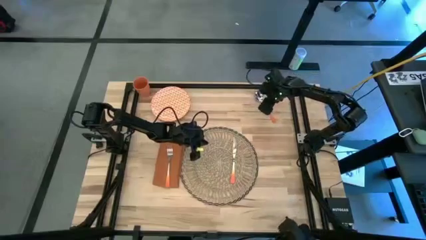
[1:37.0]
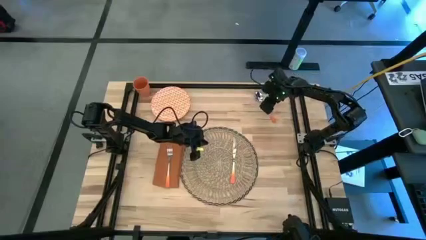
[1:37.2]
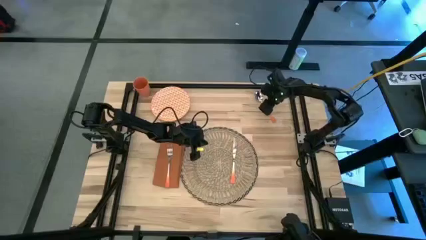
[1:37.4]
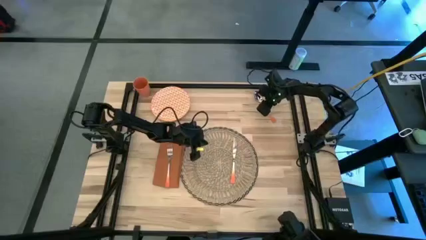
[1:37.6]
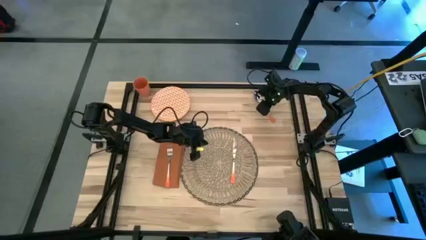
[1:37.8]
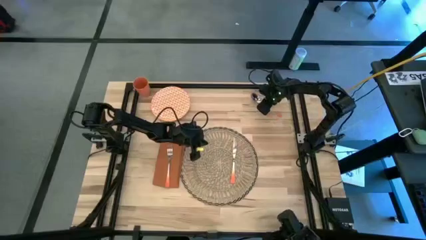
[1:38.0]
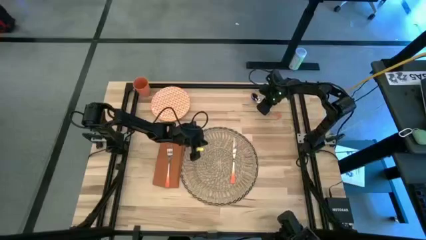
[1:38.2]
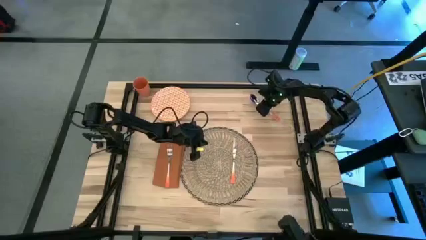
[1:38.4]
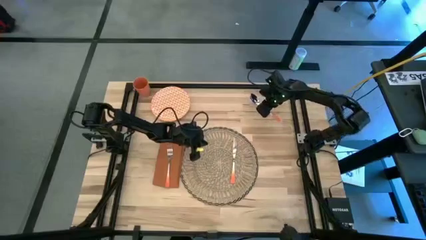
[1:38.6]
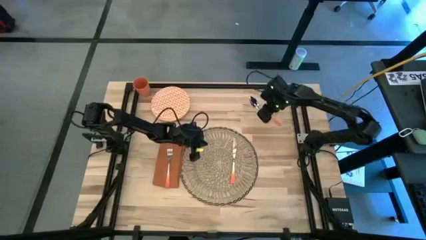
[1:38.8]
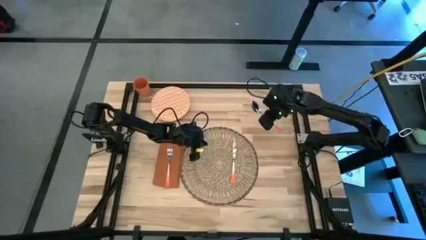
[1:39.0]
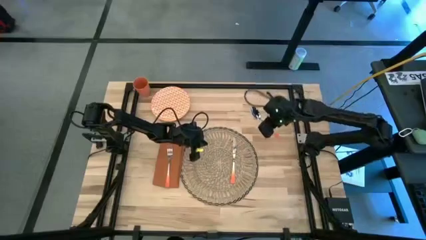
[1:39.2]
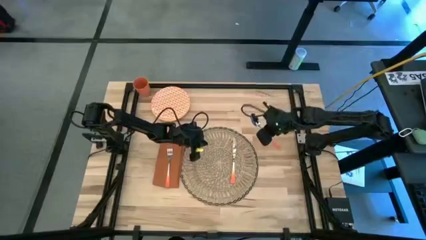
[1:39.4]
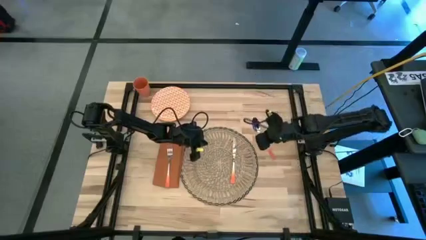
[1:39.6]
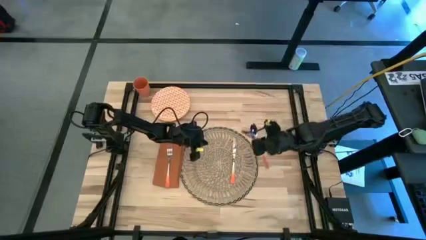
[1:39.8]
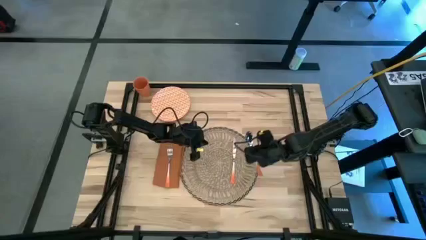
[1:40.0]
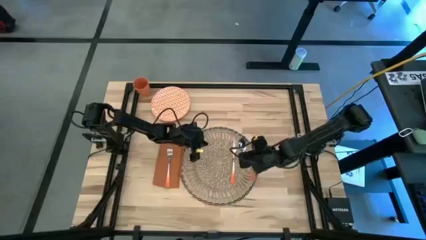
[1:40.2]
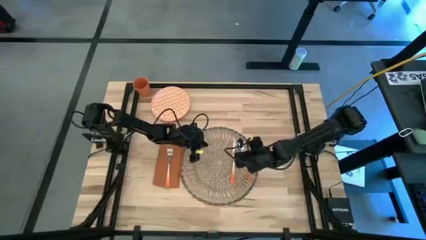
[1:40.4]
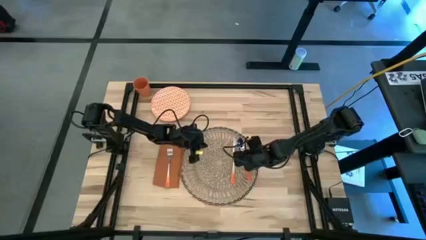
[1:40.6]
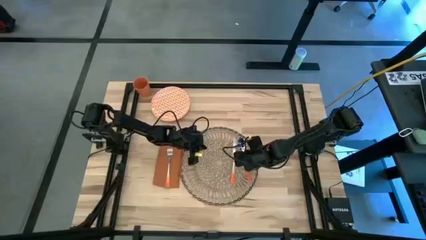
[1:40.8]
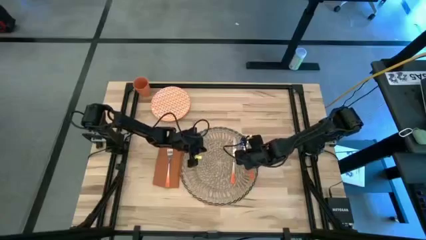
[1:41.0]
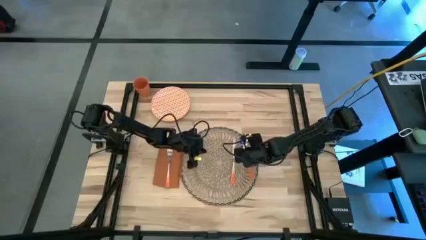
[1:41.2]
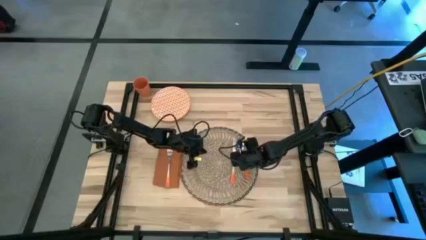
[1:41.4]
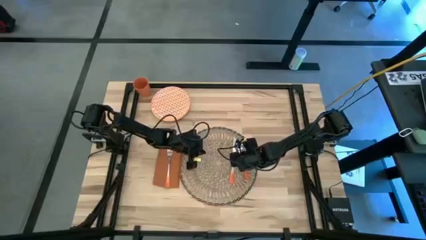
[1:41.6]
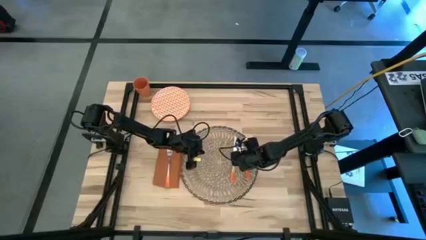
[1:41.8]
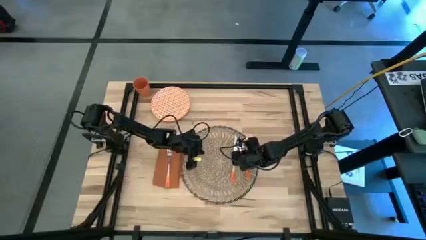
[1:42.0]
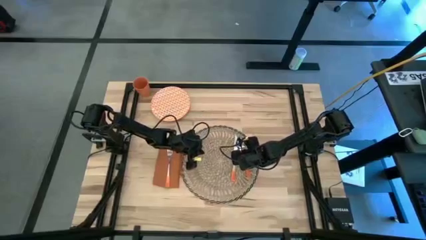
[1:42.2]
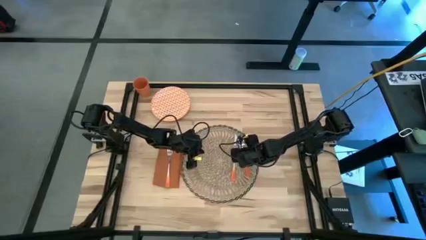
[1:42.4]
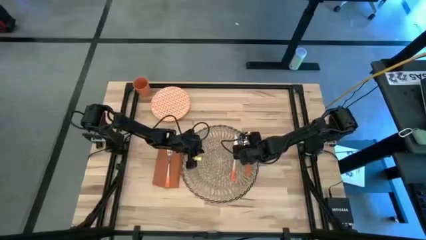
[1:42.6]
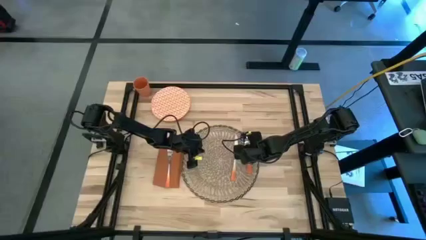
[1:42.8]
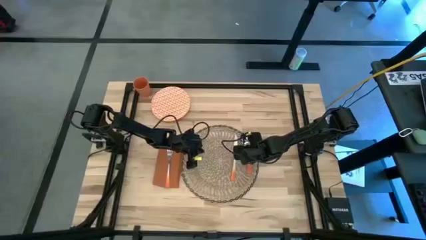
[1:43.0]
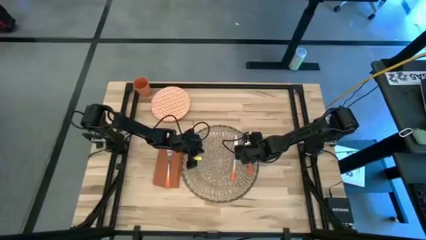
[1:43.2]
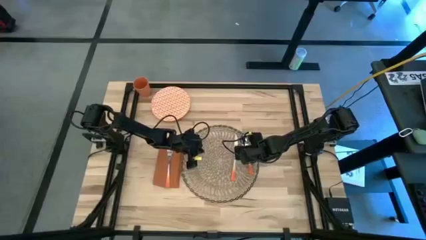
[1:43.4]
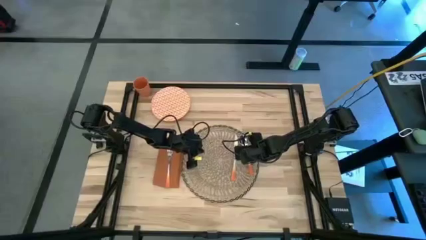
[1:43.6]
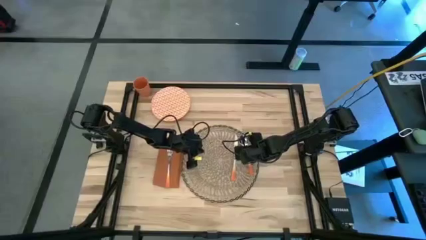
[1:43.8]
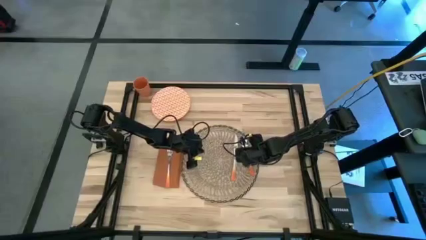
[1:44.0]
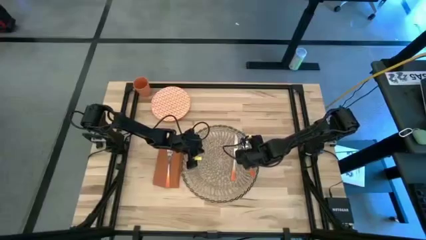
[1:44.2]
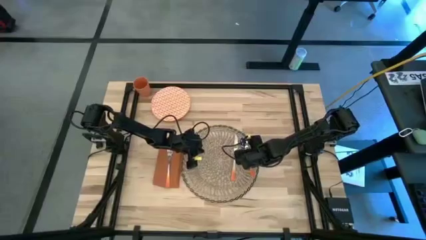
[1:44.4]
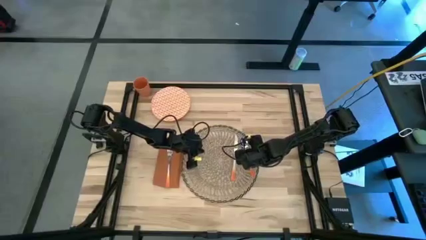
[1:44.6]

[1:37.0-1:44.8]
Task: Set table place
Put the orange spoon to the right of the orange table knife on the brown table mat

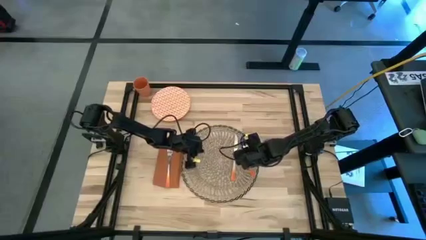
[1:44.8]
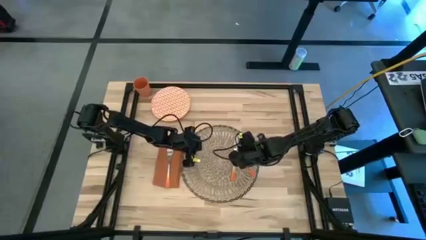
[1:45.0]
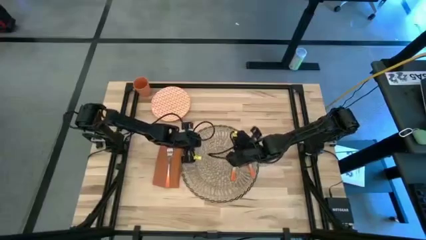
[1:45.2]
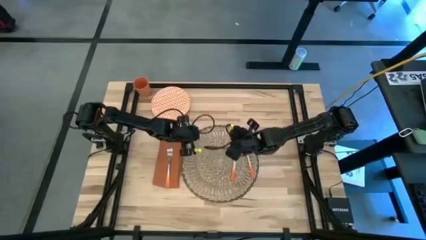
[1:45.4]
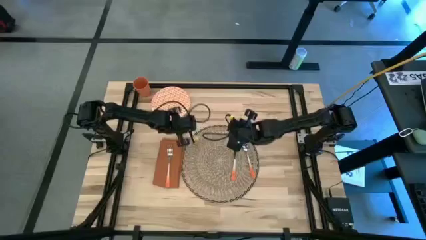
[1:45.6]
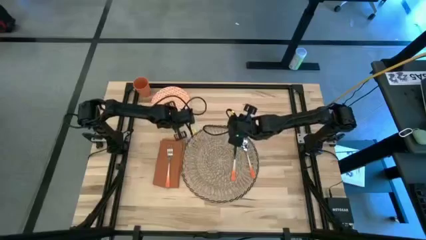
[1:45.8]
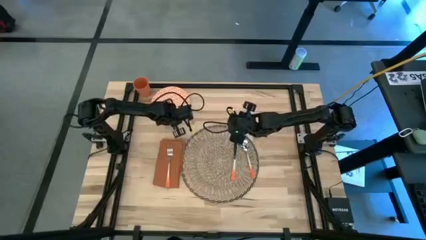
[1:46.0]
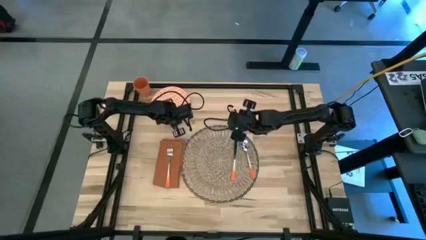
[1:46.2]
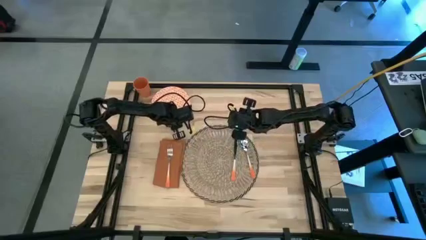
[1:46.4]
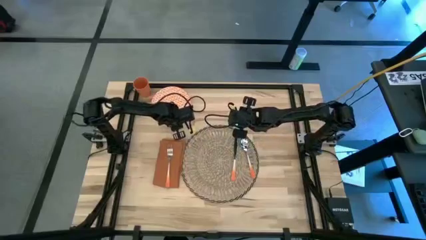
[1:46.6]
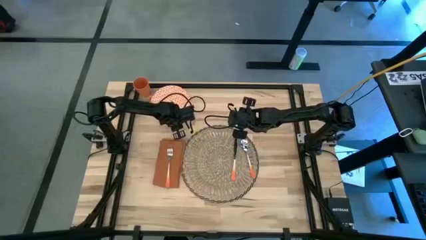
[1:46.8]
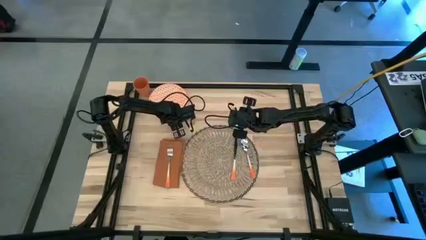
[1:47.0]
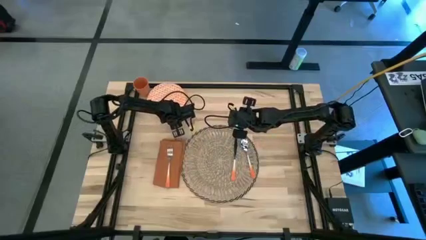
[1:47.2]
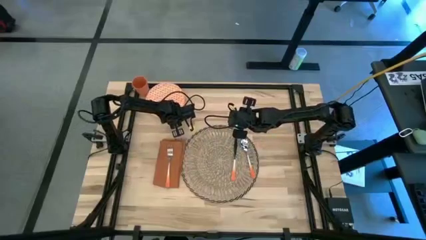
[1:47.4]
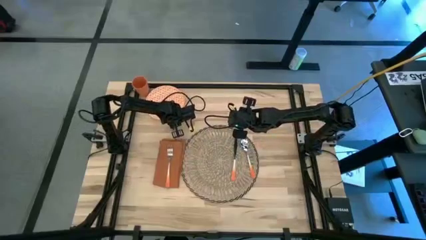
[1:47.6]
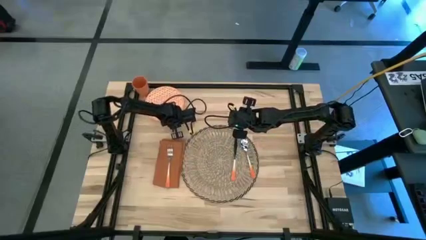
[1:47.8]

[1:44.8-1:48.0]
Put the orange plate to the left of the orange table knife on the brown table mat

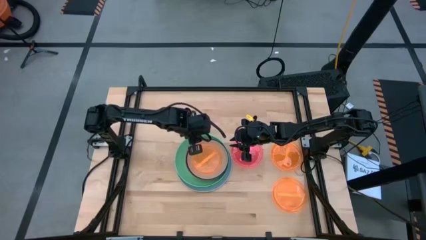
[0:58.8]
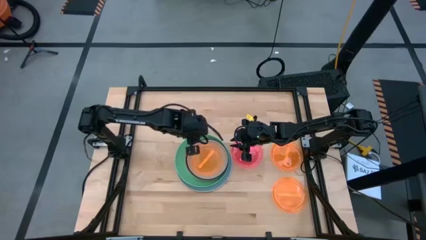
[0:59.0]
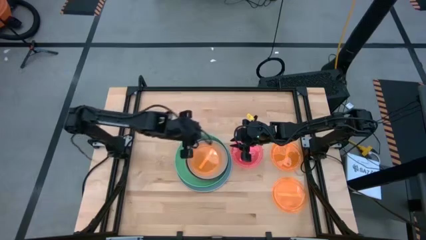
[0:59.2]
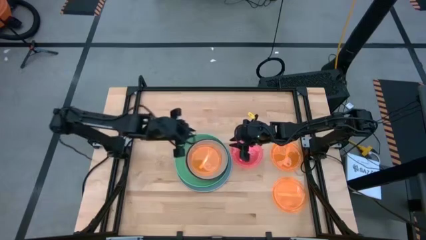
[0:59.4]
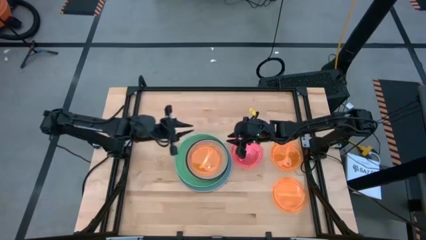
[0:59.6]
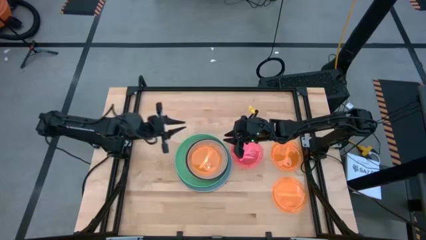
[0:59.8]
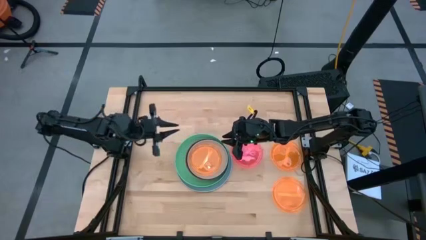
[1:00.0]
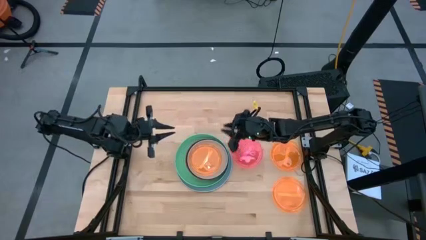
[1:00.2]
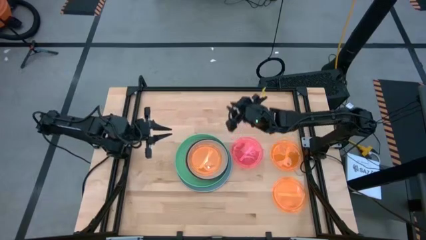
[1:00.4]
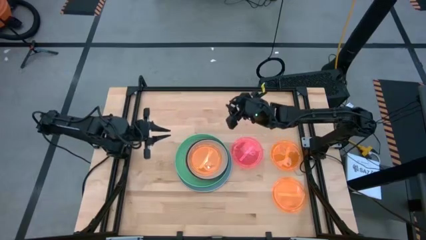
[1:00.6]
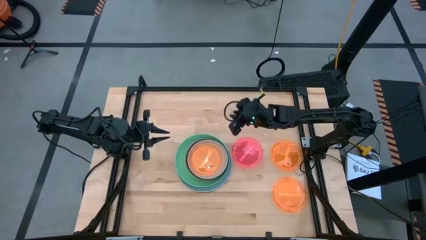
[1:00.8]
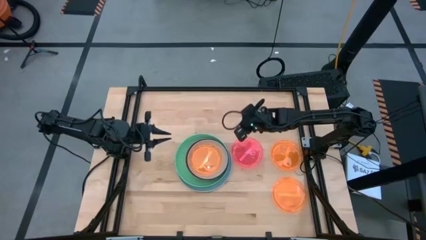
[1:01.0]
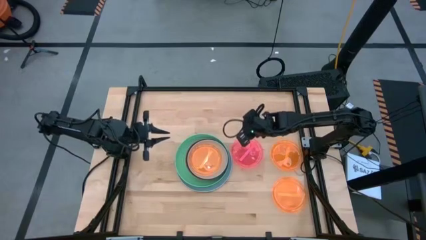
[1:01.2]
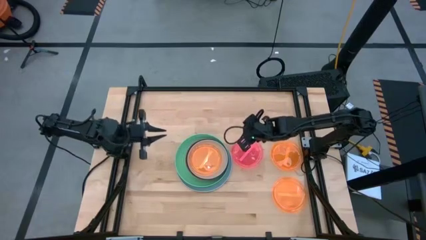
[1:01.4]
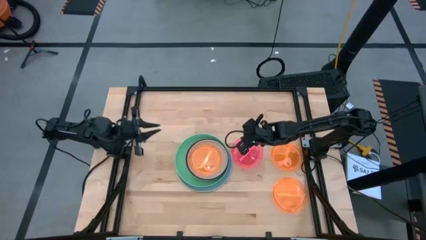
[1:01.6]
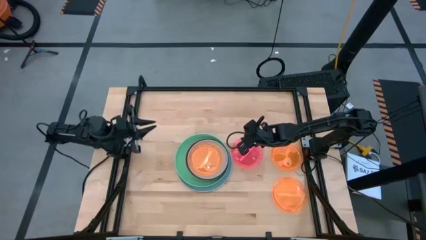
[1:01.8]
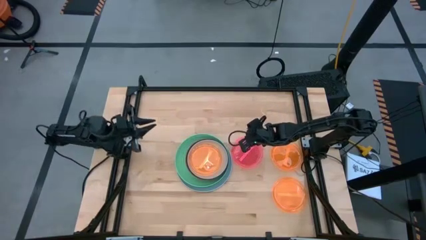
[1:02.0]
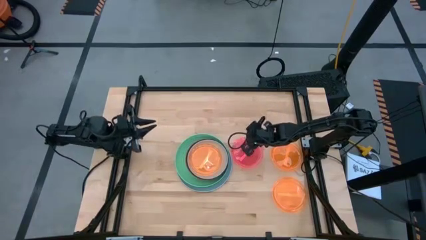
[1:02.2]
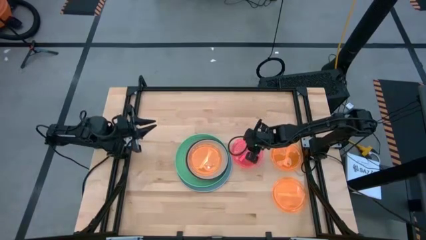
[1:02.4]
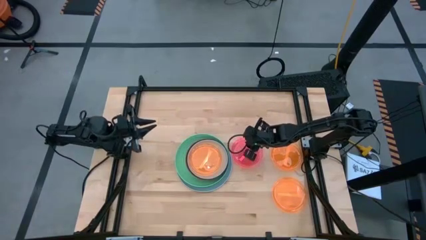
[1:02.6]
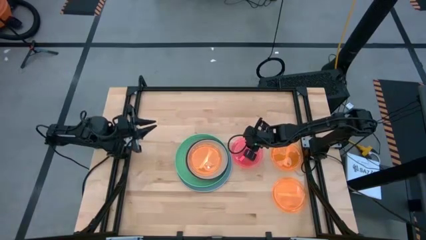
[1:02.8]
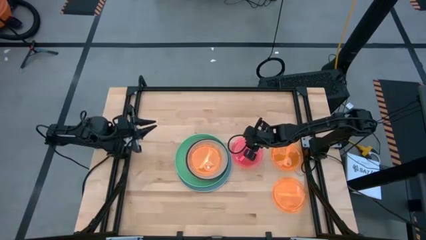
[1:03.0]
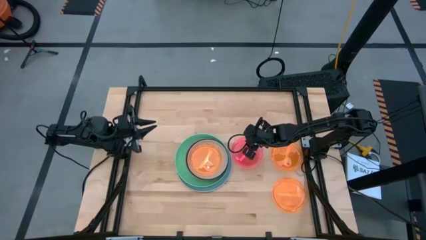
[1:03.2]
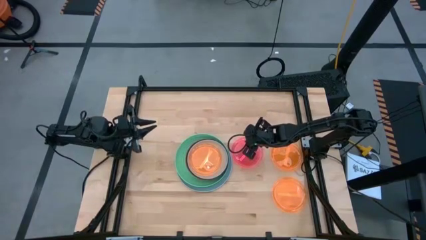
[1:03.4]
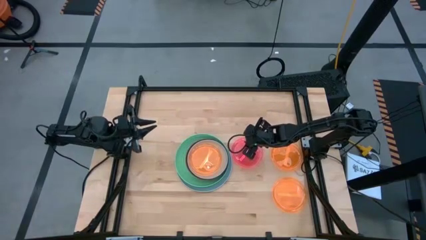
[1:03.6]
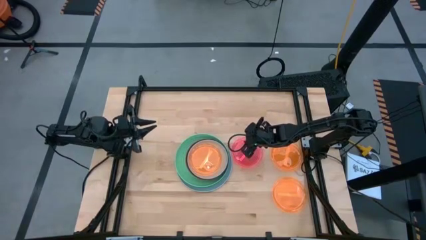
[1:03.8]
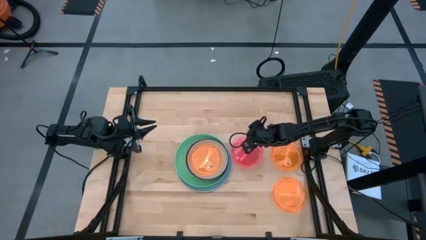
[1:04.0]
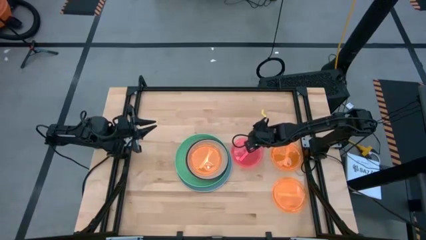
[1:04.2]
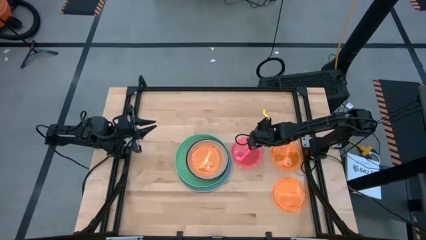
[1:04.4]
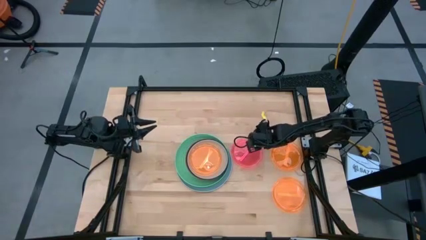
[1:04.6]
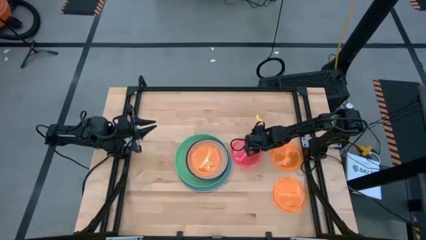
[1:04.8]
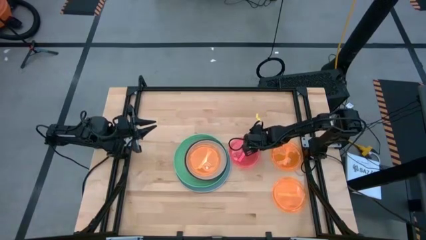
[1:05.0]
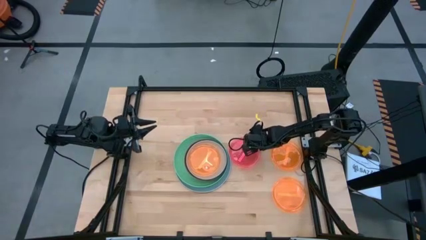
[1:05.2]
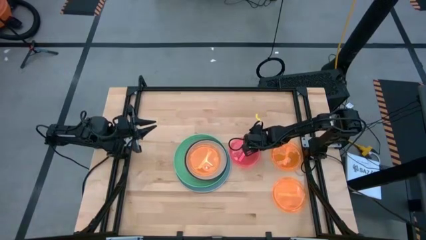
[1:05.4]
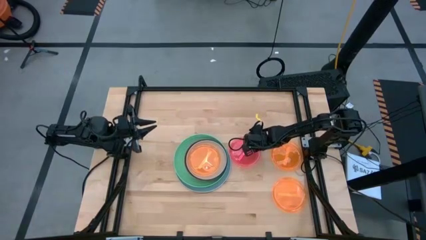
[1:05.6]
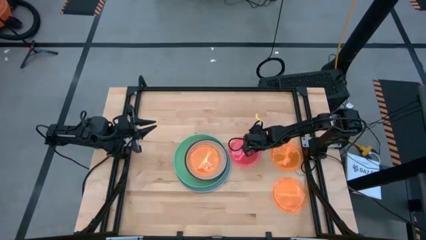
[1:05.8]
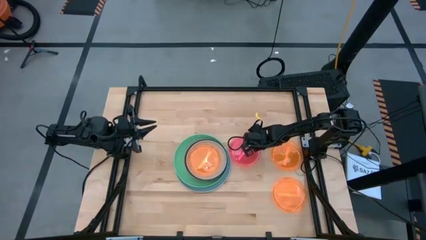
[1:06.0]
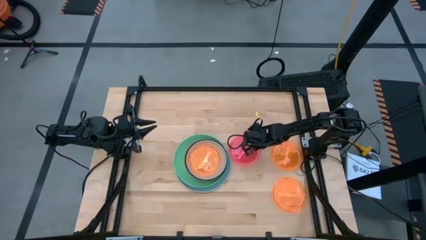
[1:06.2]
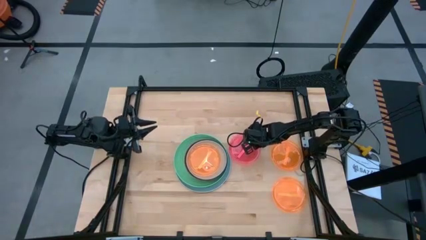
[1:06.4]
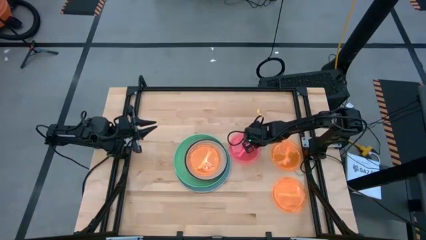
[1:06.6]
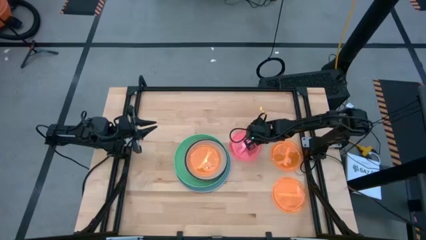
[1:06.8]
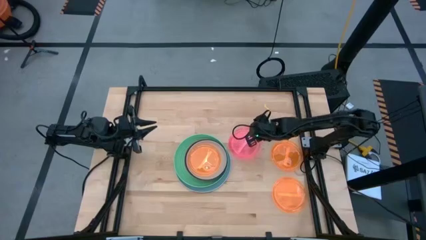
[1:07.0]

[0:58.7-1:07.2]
Task: Stack plastic plates
Stack the transparent pink plate on top of the top left transparent orange plate
